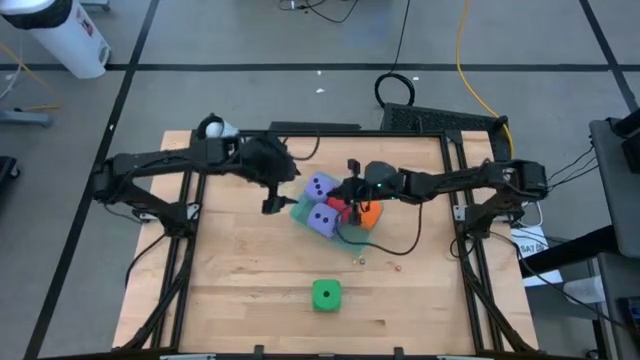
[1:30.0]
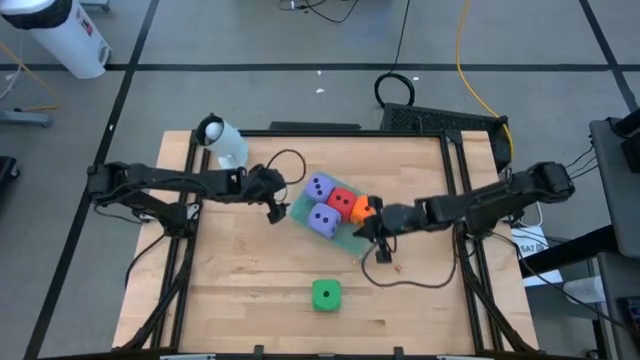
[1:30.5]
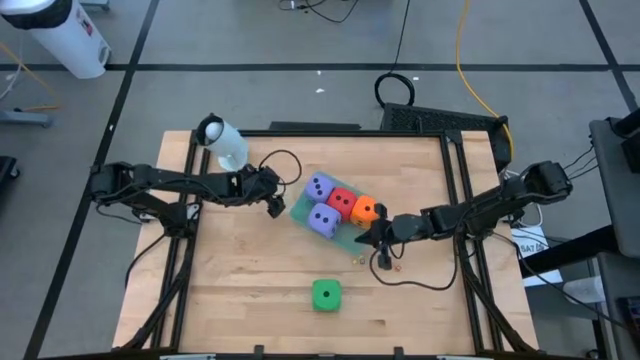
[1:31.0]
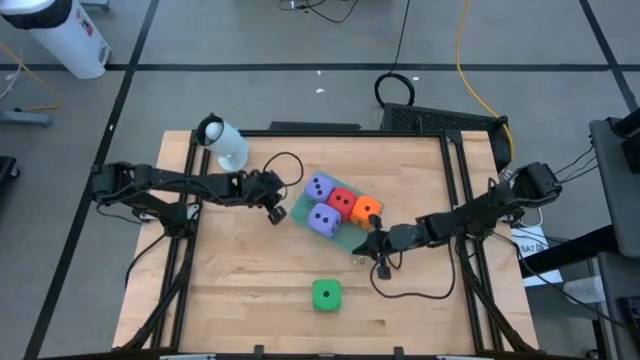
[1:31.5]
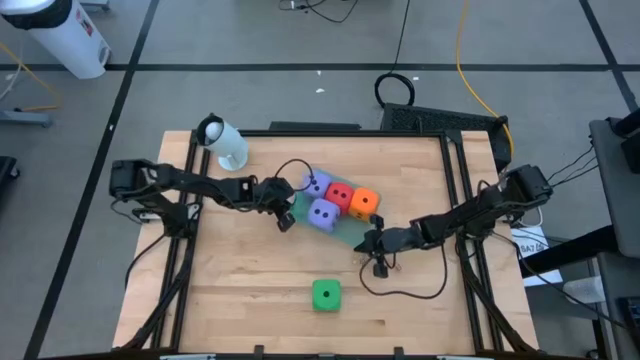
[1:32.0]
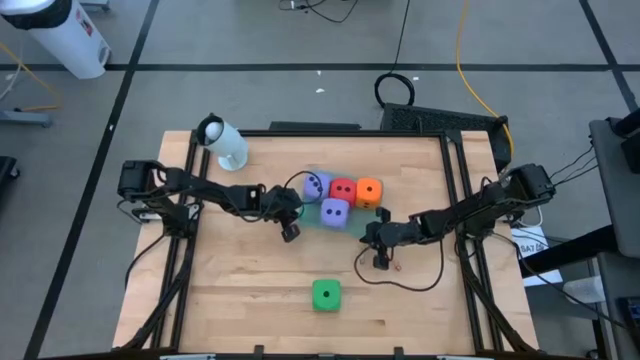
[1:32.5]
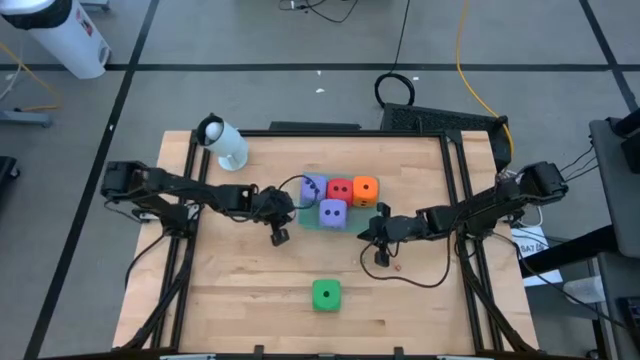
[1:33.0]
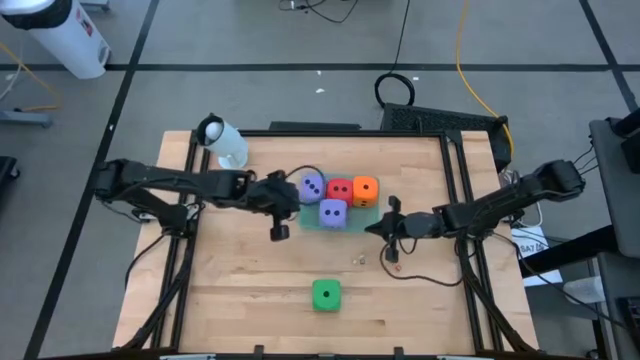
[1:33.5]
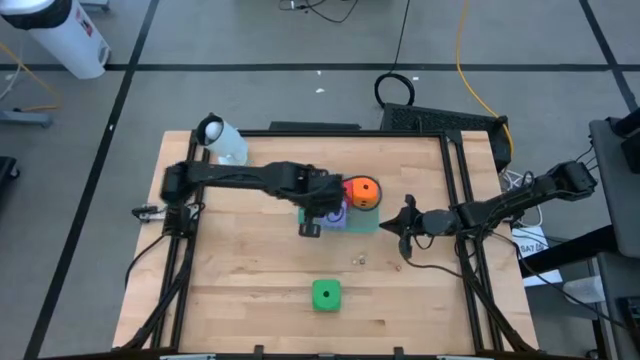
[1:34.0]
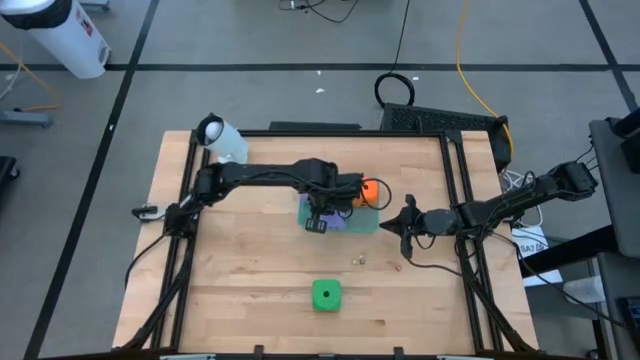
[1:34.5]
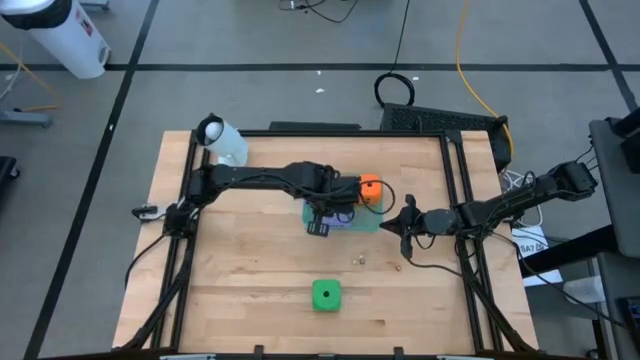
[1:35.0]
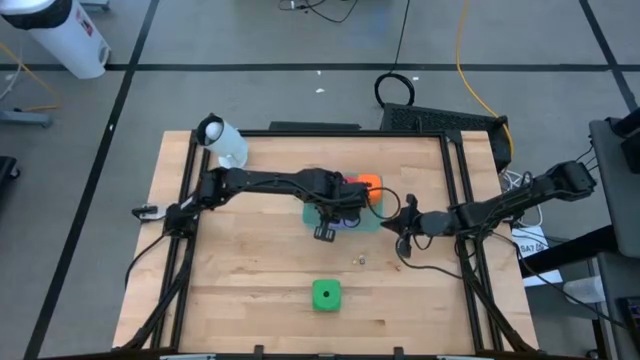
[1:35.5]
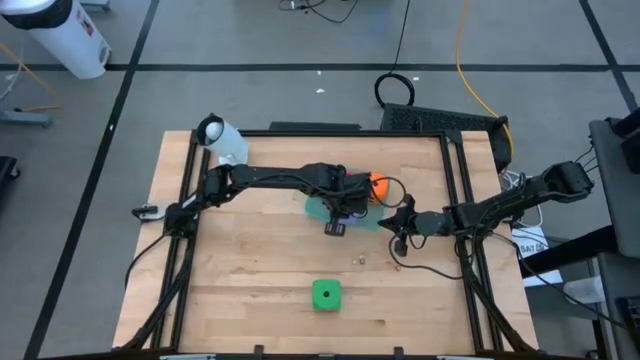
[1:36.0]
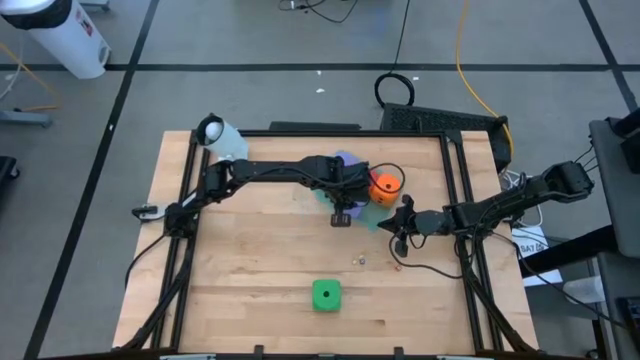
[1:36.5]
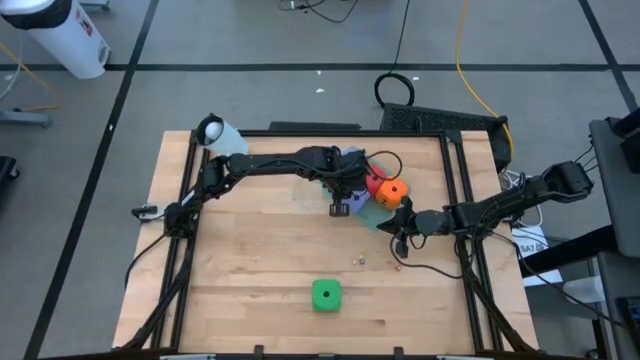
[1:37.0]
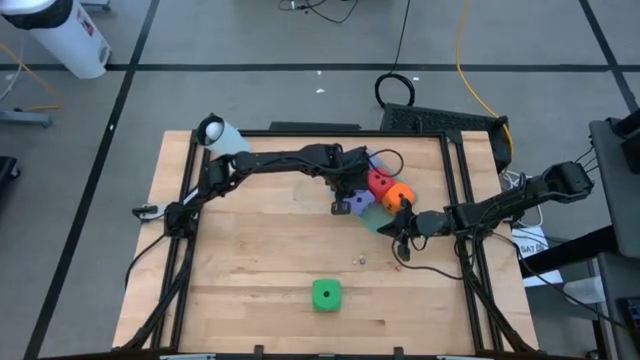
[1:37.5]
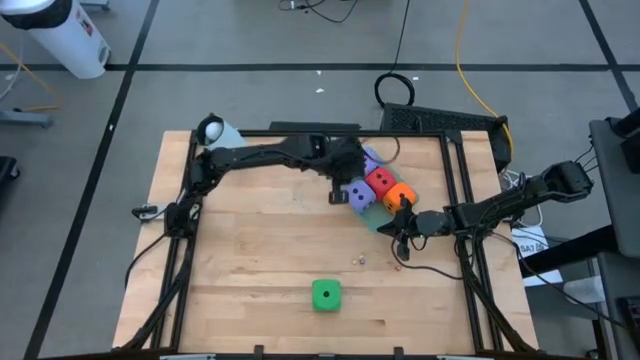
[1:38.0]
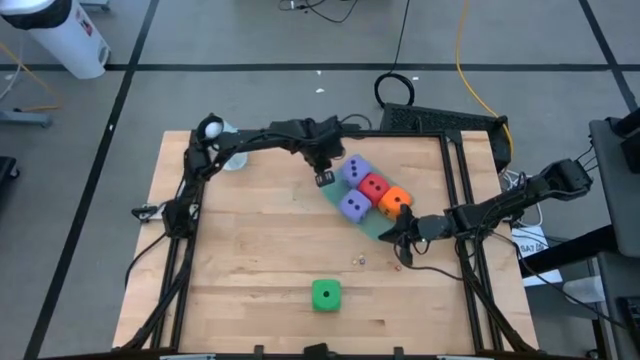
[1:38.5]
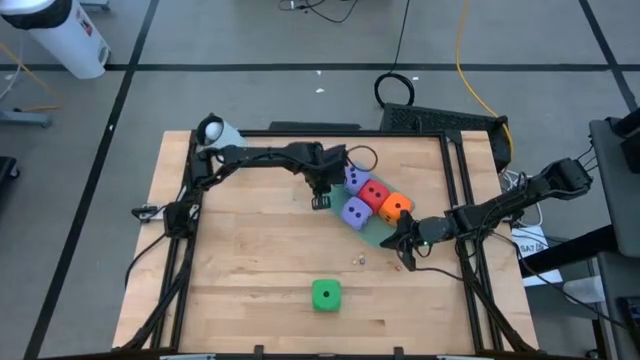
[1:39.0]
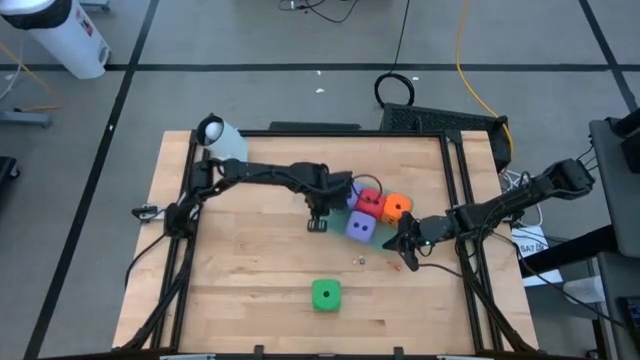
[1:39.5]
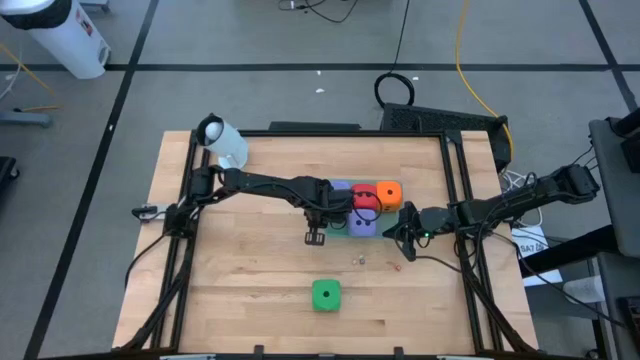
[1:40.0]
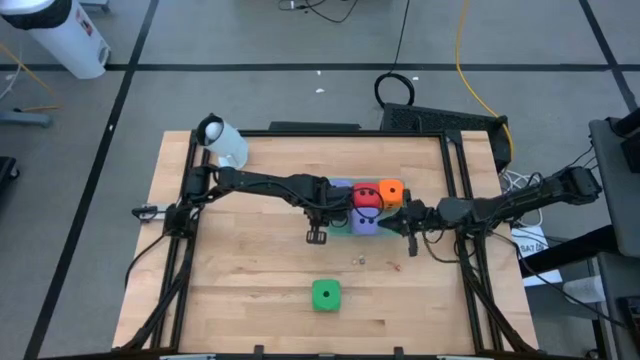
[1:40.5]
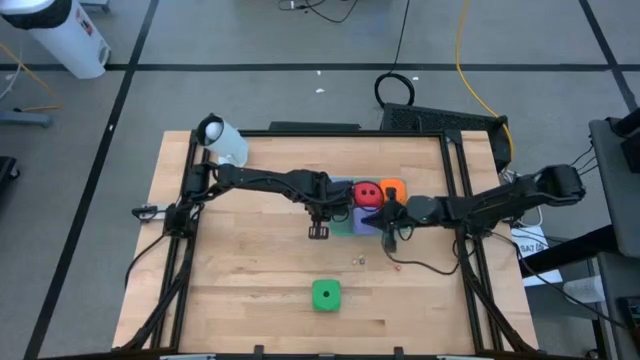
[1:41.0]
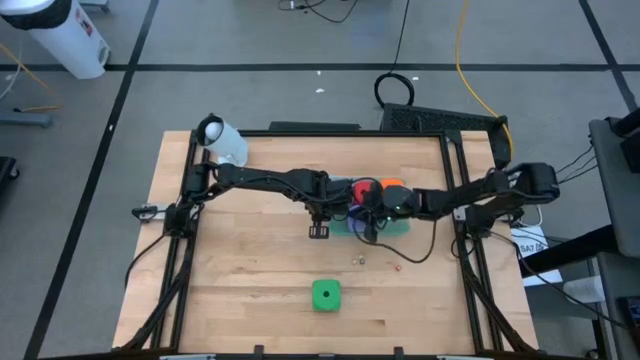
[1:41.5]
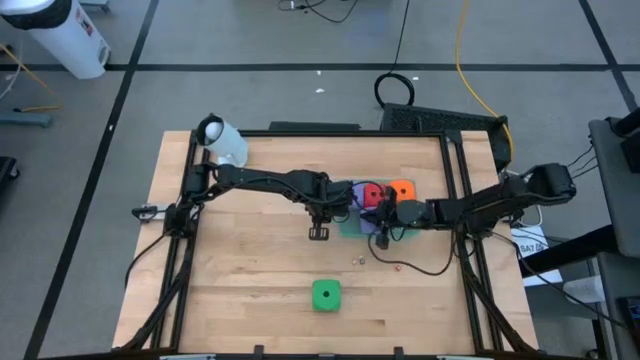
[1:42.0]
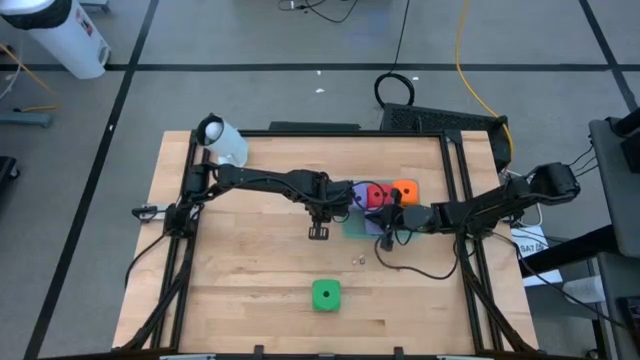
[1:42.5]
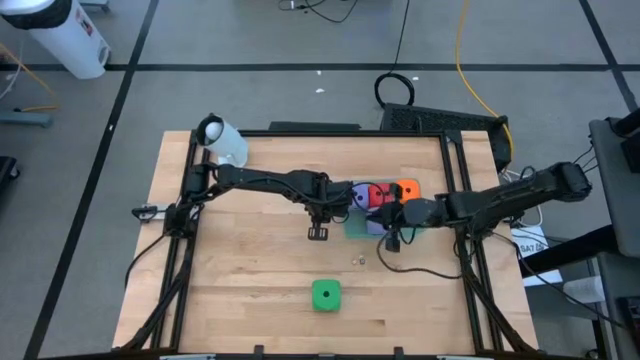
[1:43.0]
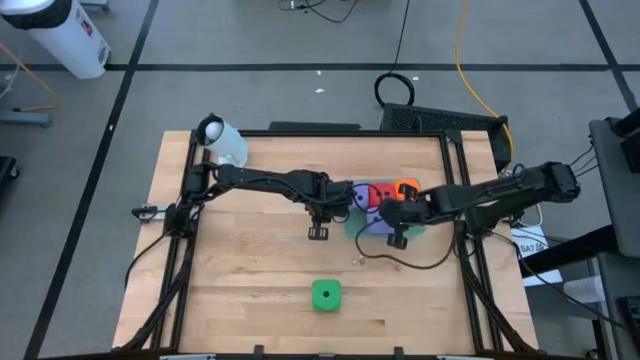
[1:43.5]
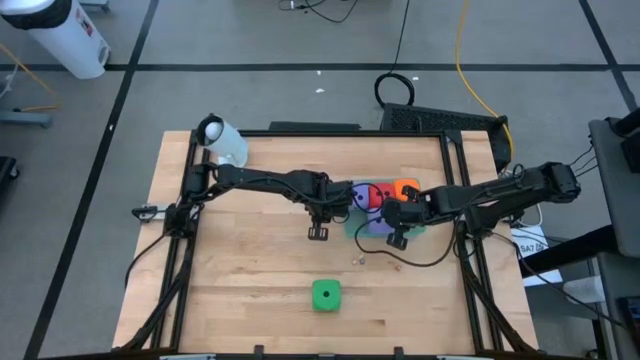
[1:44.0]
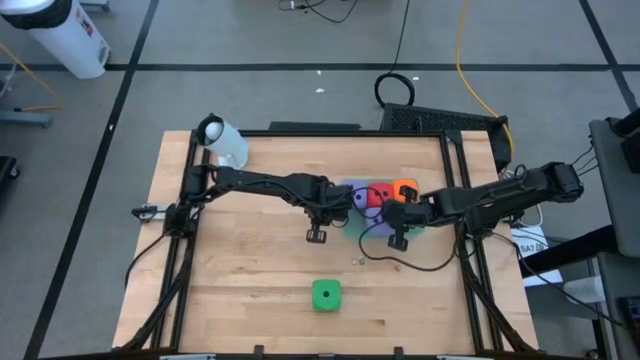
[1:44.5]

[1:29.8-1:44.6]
Task: Pick & Place Dice
Put the large purple die into the green bin

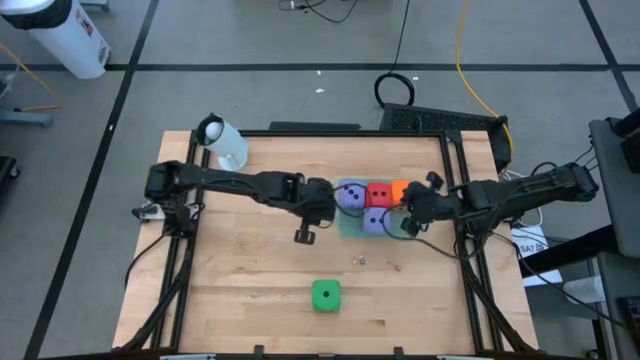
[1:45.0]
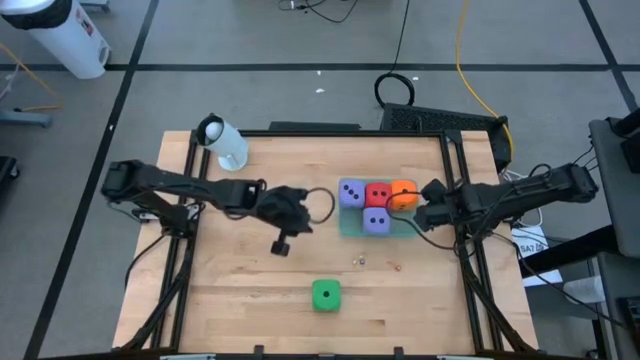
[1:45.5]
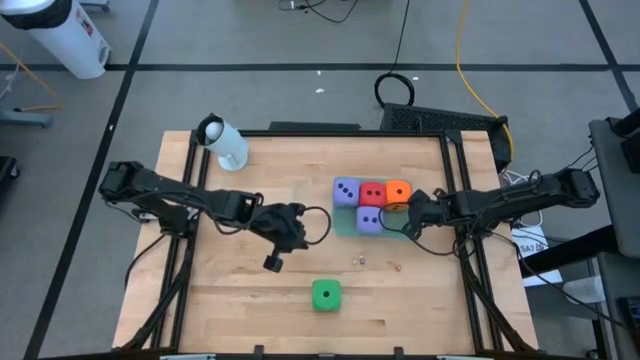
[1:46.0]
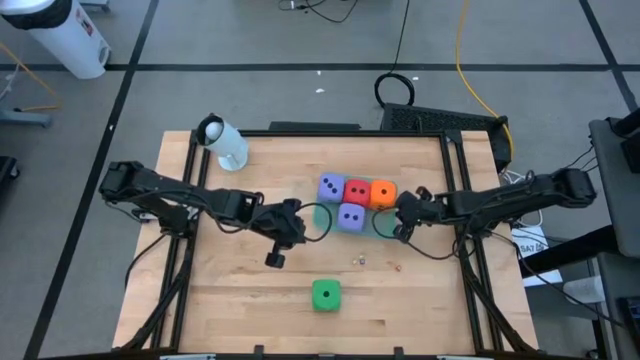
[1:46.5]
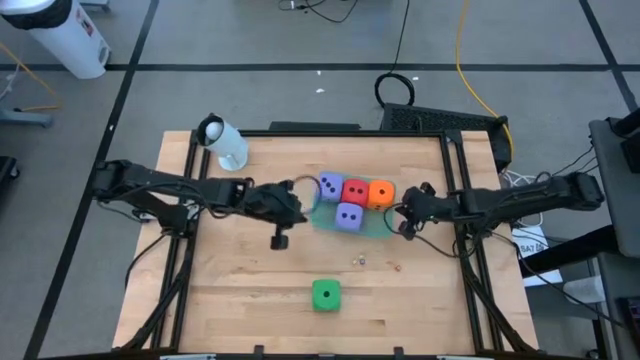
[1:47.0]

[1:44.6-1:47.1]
Adjust the green bin on the table

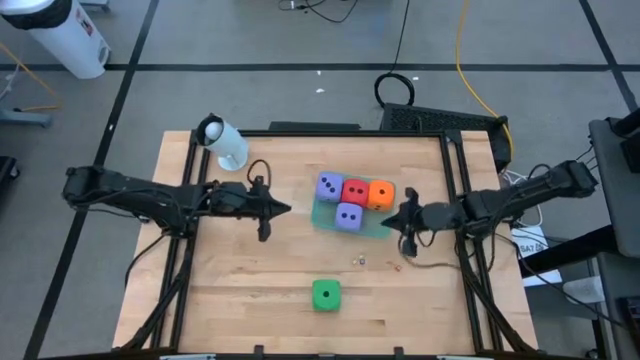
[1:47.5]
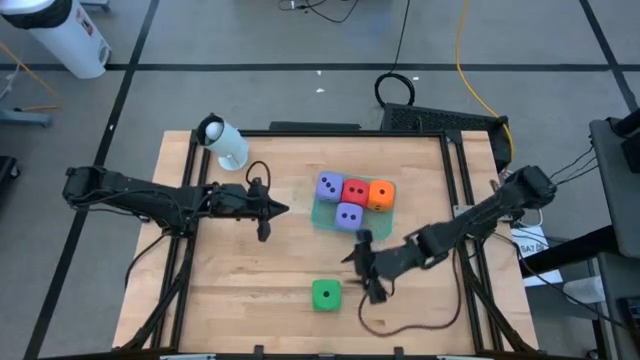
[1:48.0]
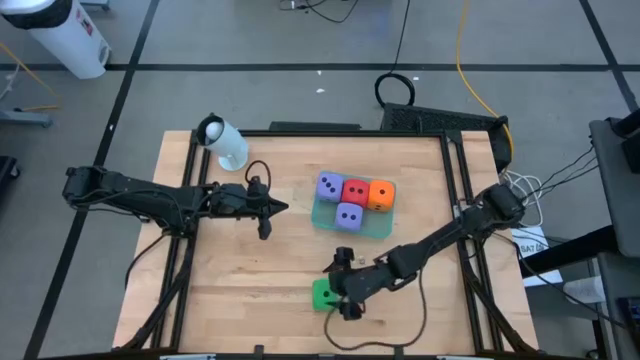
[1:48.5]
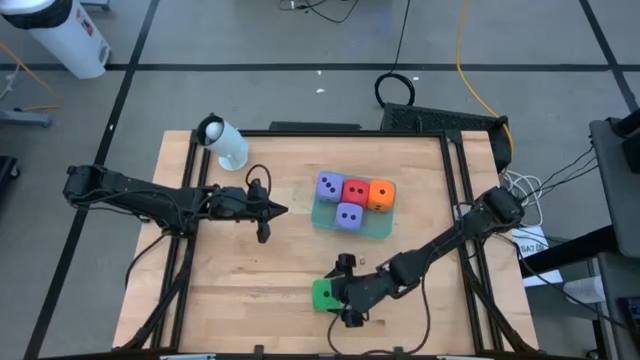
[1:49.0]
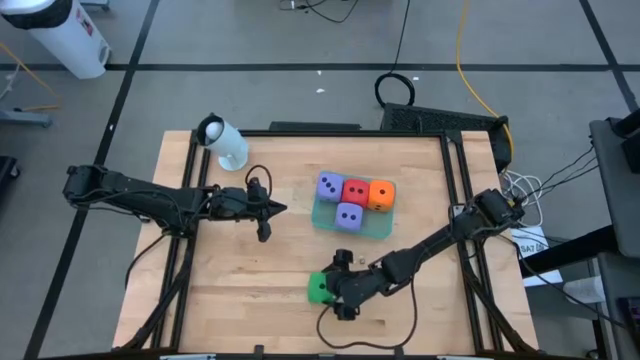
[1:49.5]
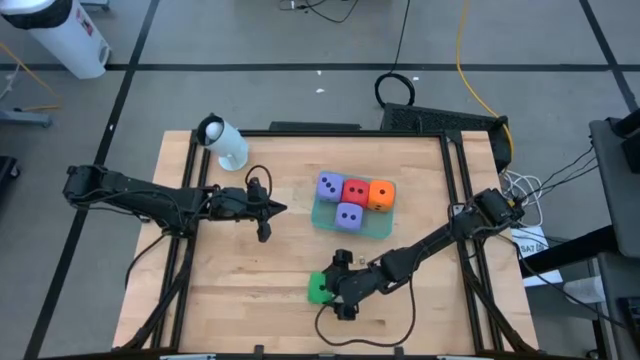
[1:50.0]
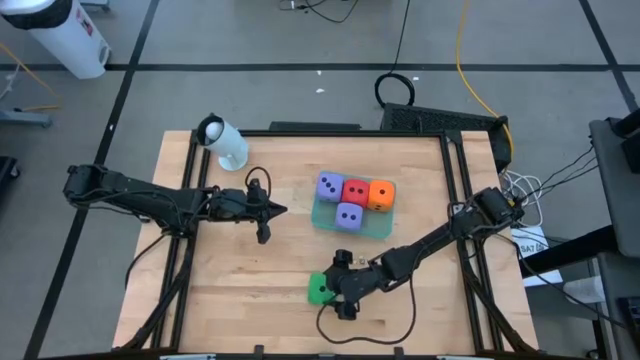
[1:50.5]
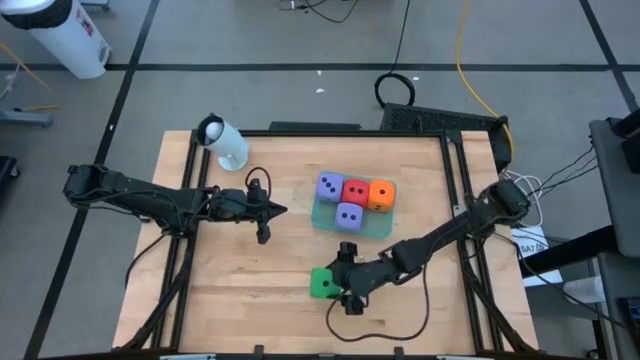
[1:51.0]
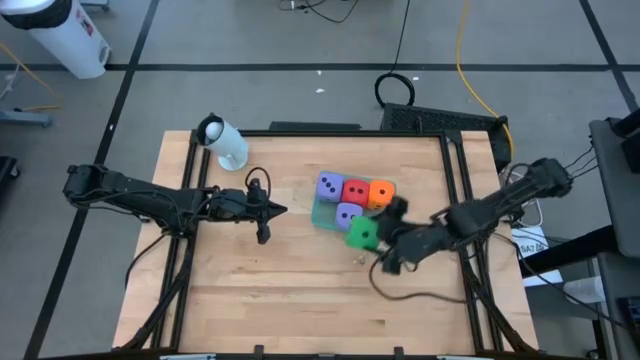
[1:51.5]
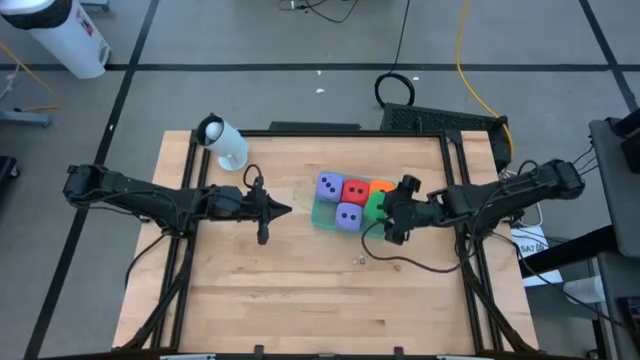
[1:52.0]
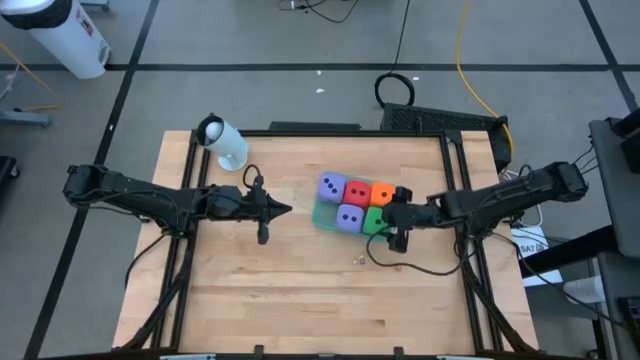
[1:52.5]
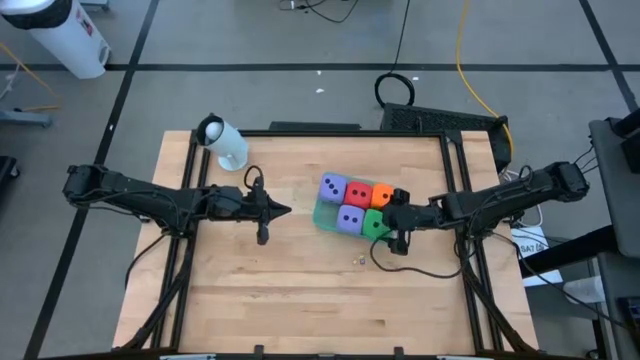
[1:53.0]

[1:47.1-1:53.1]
Put the large green die into the green bin
